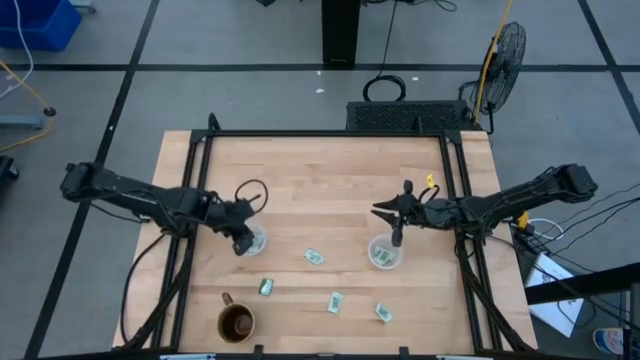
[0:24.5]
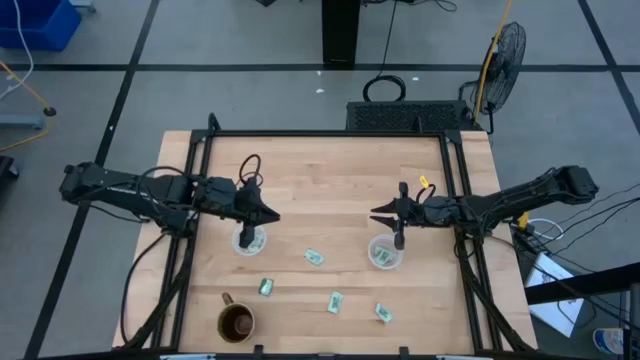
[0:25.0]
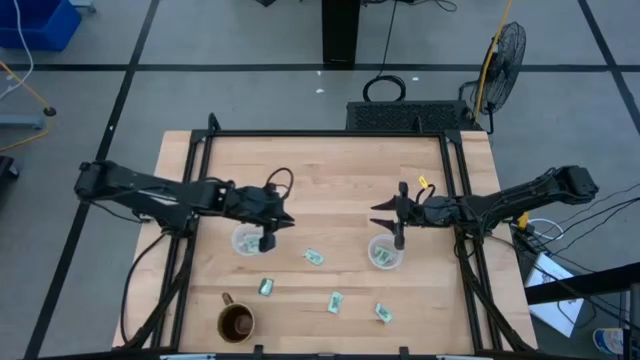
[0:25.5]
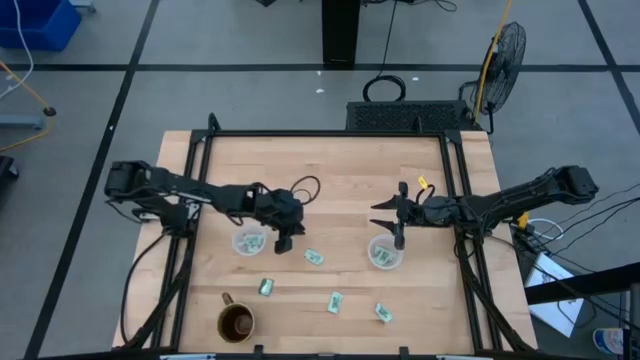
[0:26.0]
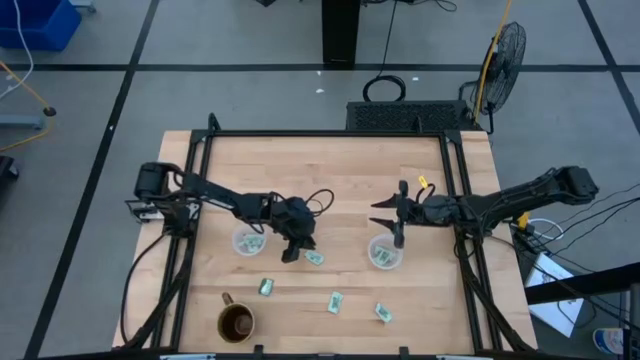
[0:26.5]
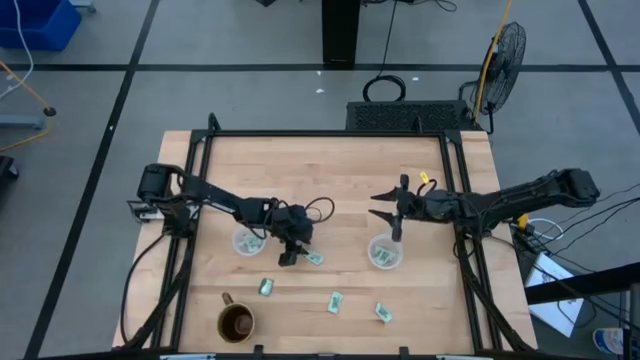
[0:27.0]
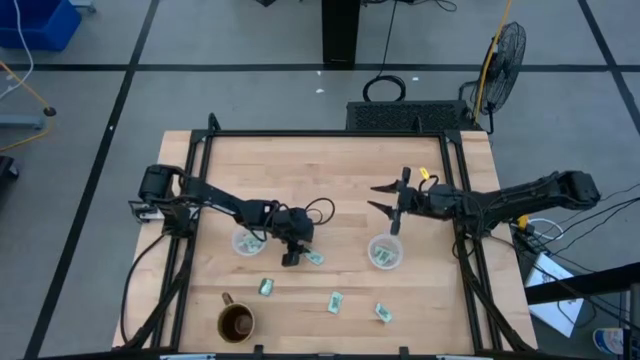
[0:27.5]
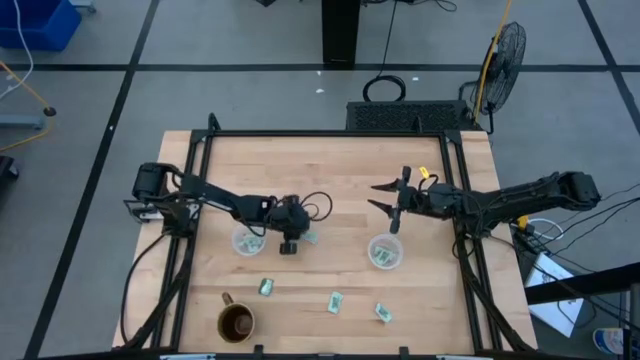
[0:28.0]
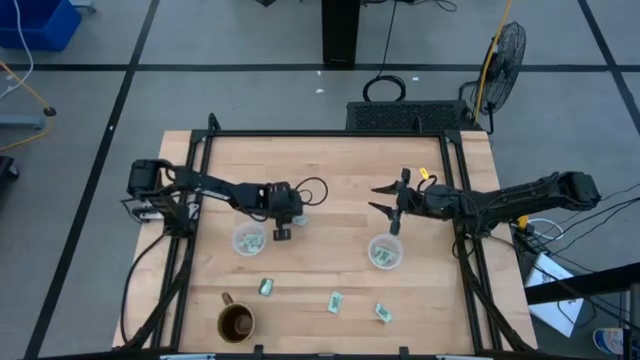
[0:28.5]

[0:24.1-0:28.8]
Task: Pick and place Stevia / Truvia into bins
Put the light green stevia packet into the left transparent container

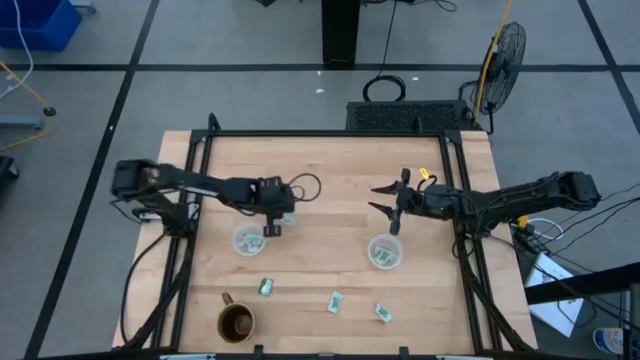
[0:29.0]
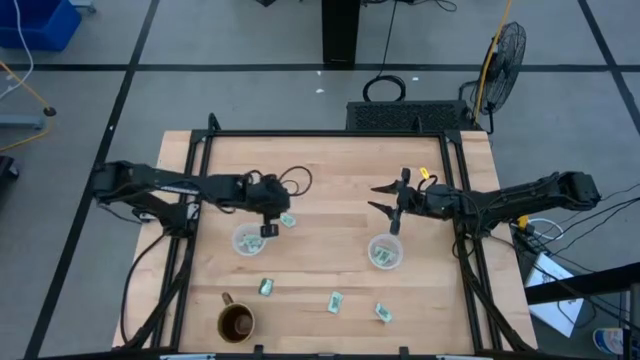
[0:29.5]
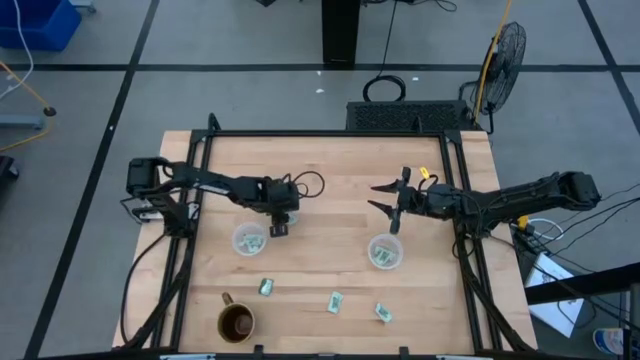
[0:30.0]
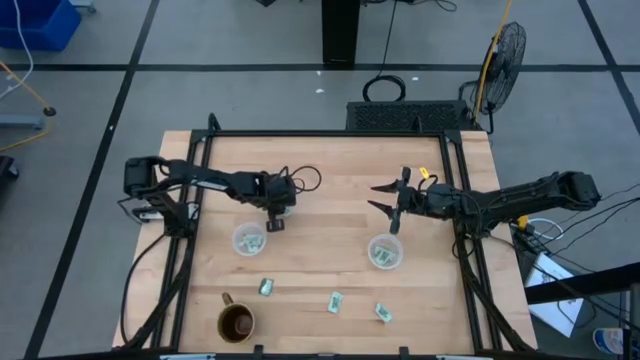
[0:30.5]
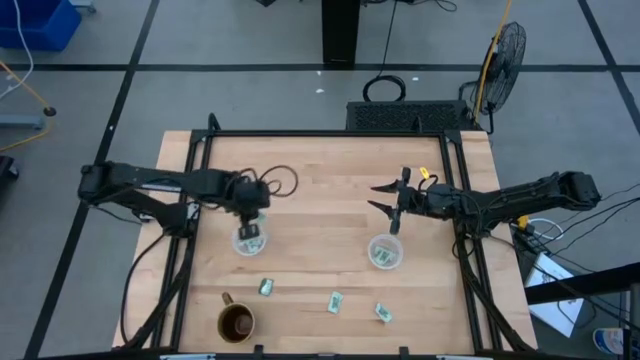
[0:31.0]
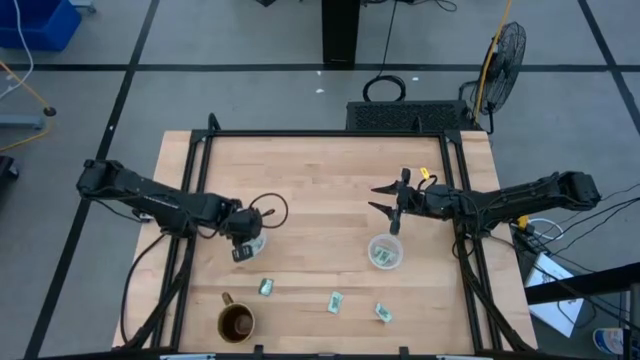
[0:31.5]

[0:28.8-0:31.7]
Put the light green stevia packet into the left transparent container

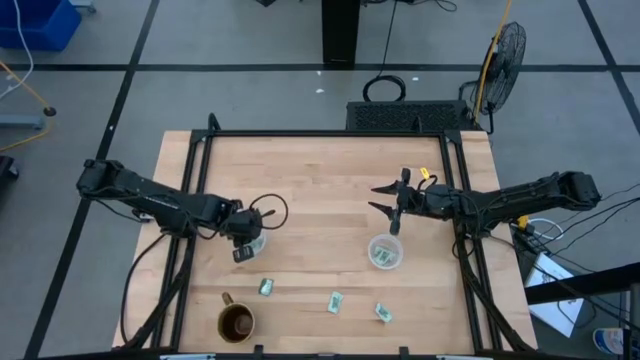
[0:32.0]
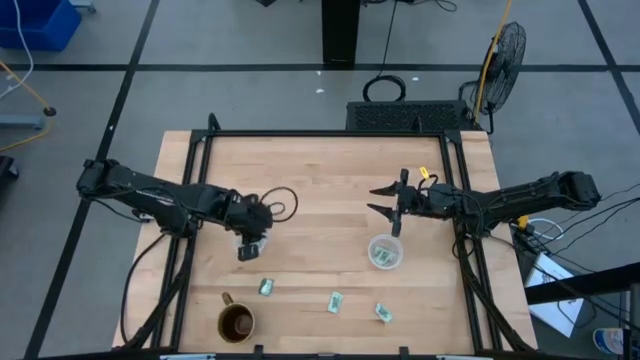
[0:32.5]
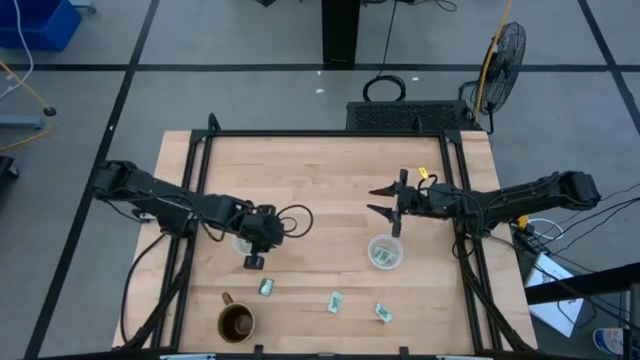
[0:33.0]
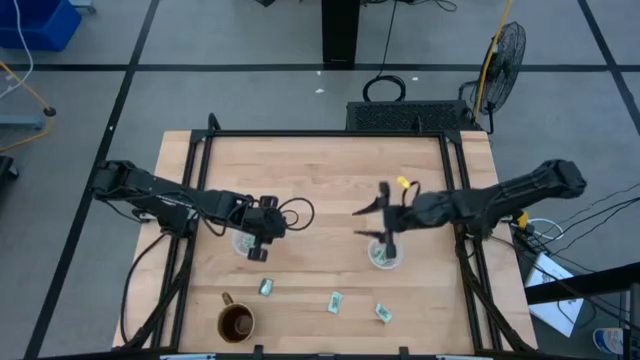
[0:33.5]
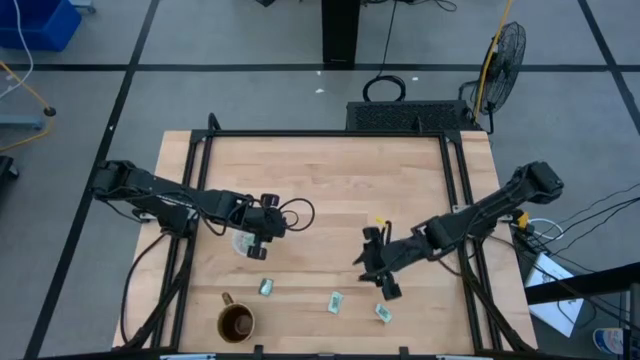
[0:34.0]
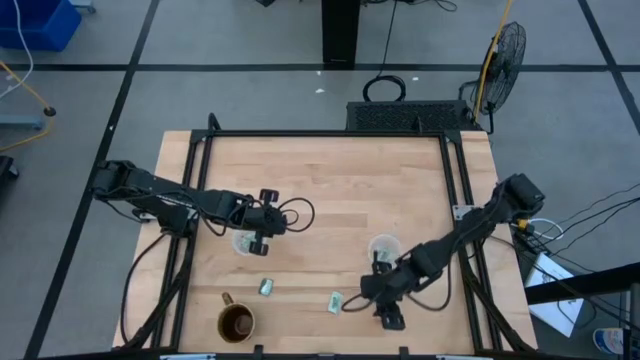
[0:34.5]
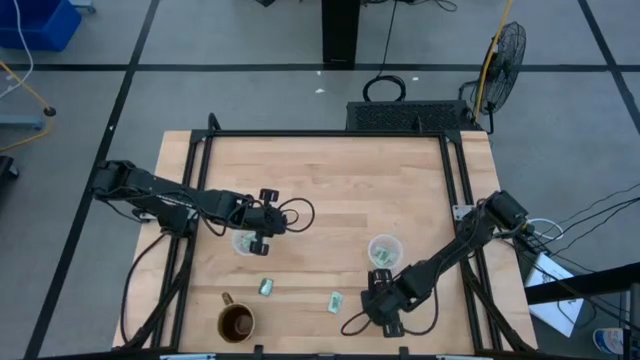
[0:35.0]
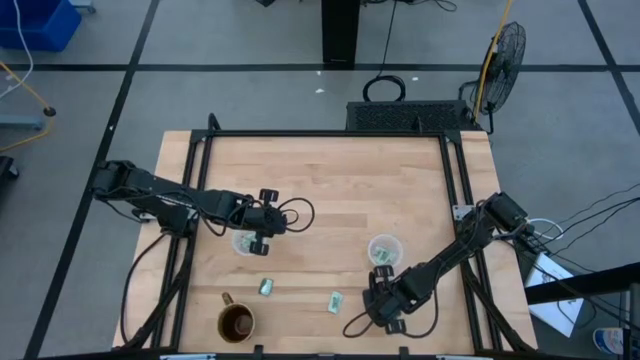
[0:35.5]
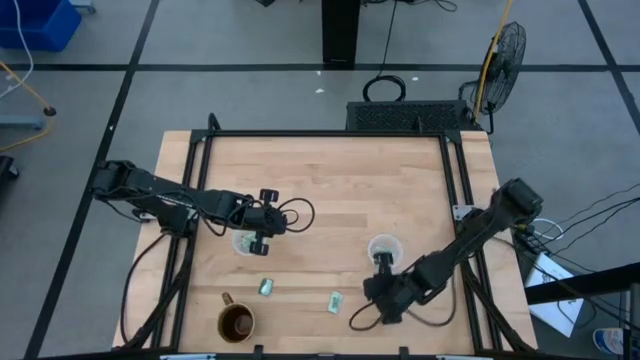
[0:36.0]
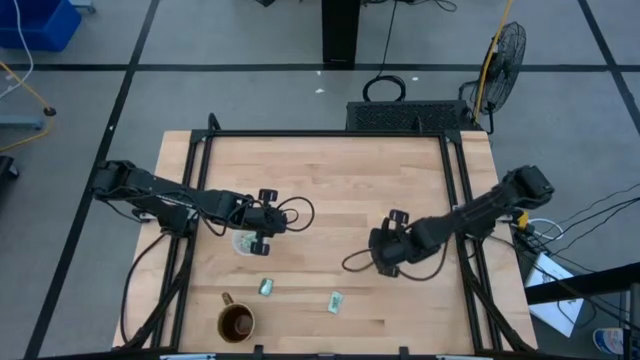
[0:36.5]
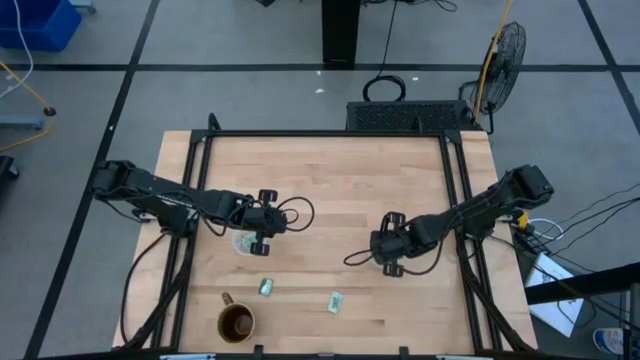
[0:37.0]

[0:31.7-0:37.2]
Put the light green stevia packet into the right transparent container

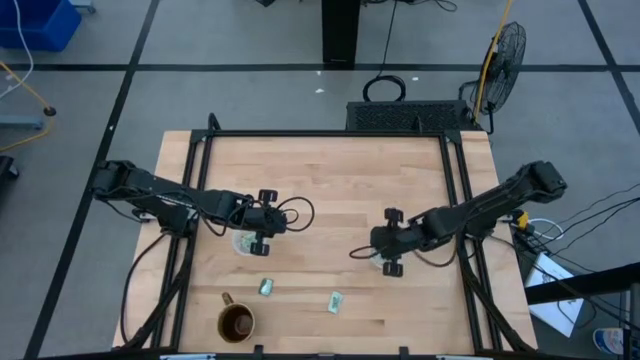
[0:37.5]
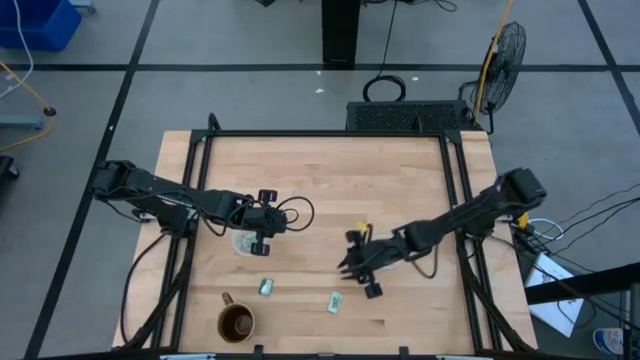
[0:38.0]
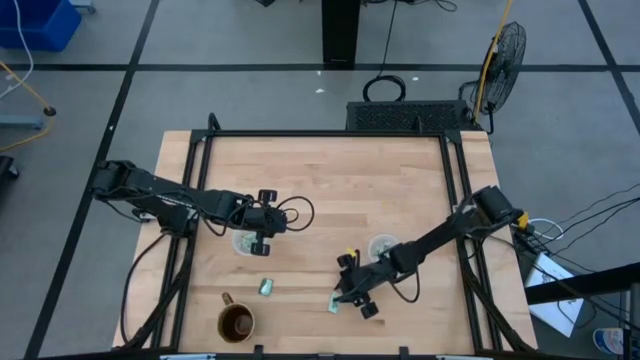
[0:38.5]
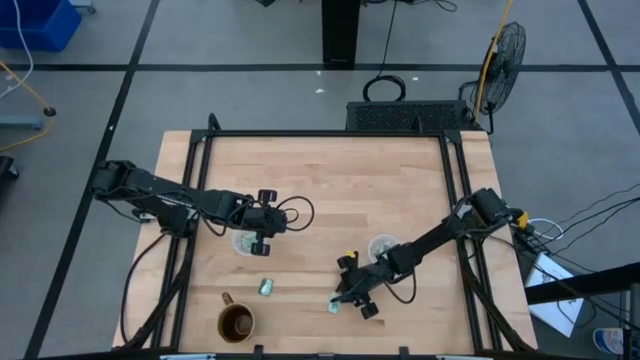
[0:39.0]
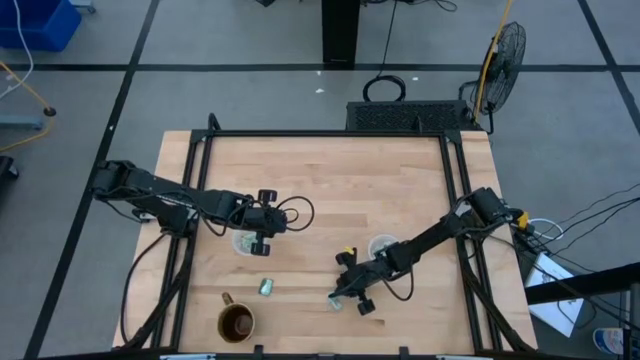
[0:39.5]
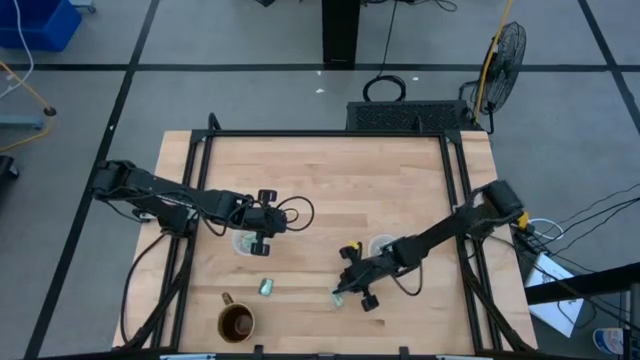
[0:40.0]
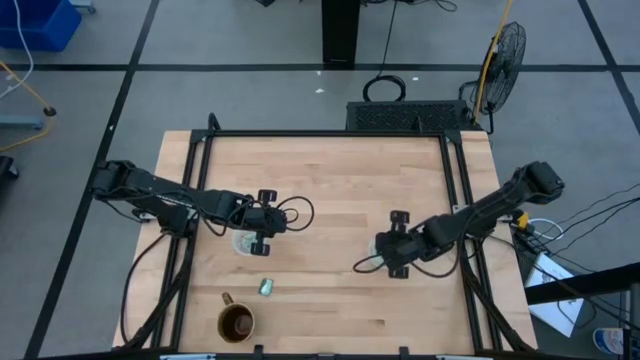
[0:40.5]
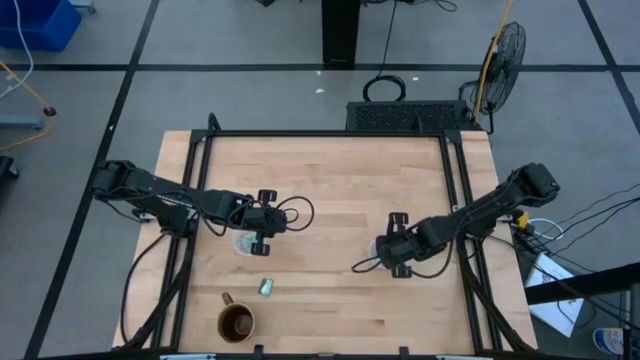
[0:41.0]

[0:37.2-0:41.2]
Put the light green stevia packet into the right transparent container

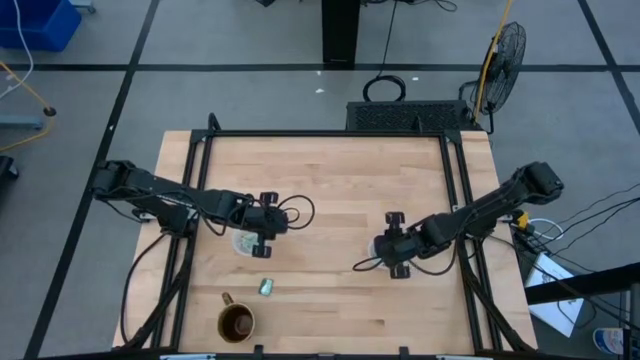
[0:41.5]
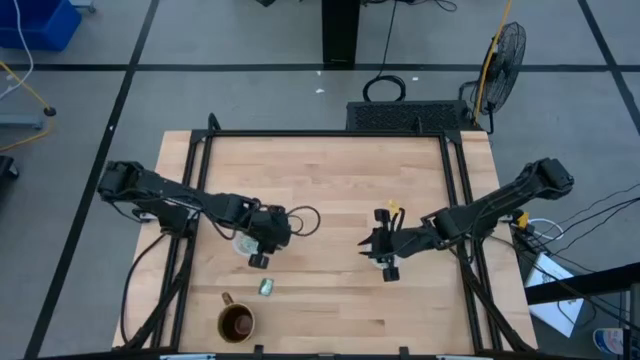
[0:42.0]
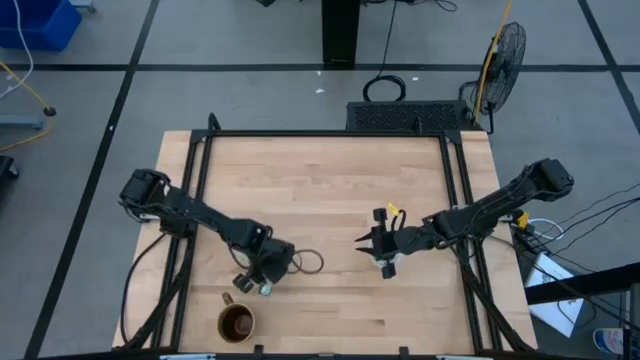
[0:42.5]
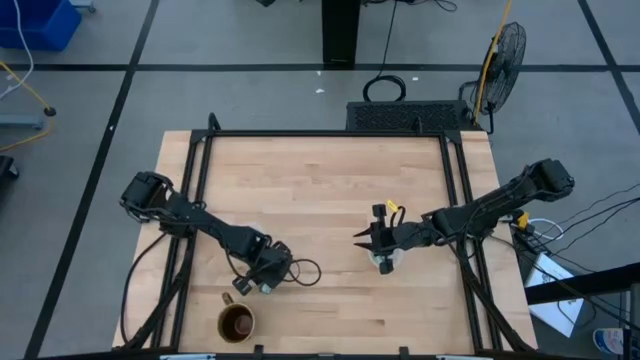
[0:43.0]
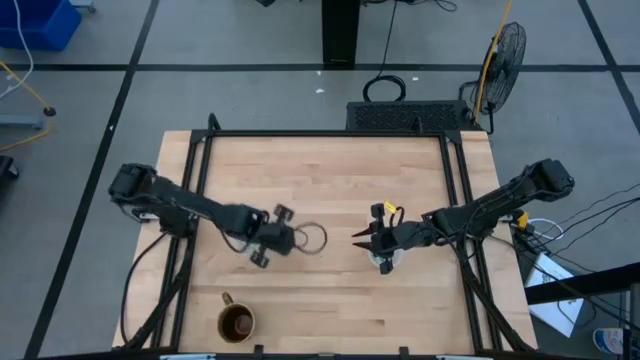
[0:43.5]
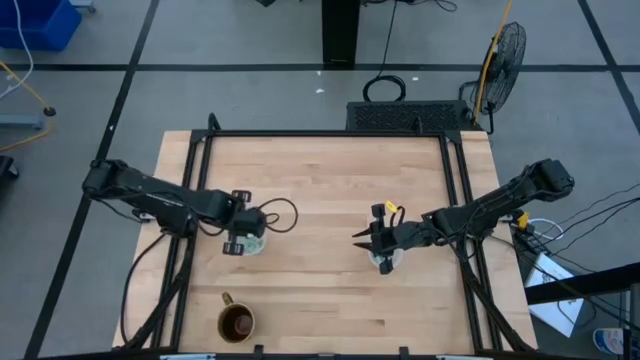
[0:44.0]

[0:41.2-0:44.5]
Put the green stevia packet into the left transparent container

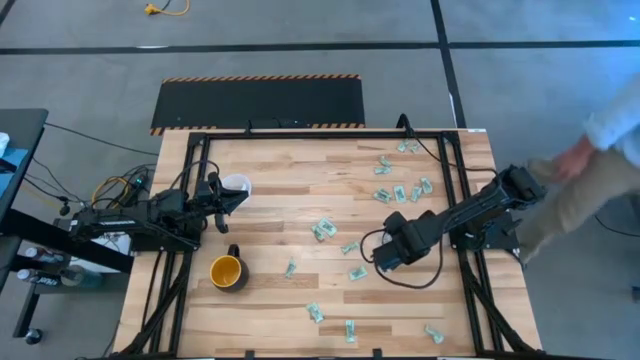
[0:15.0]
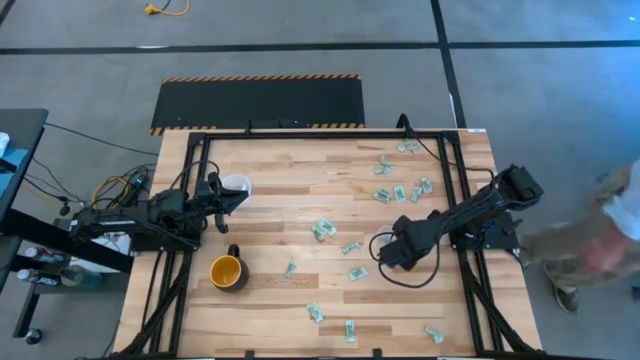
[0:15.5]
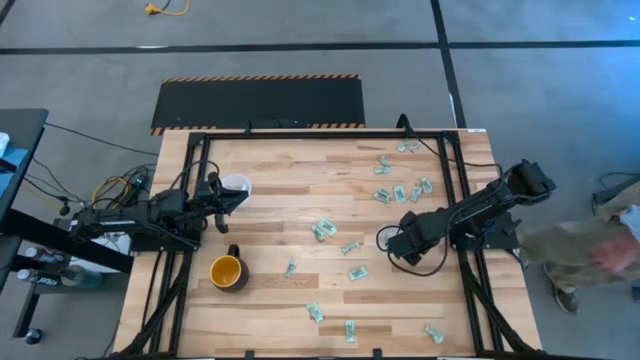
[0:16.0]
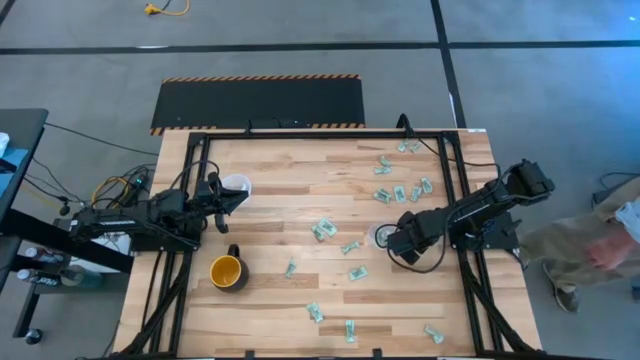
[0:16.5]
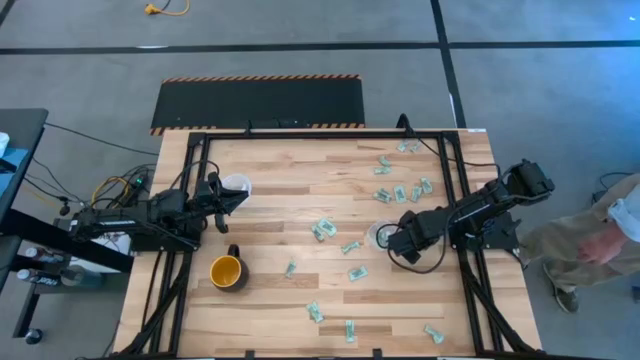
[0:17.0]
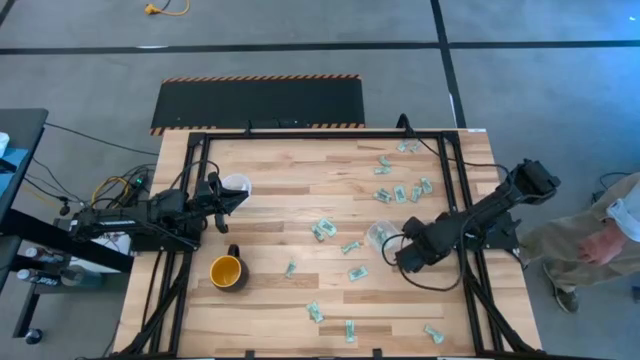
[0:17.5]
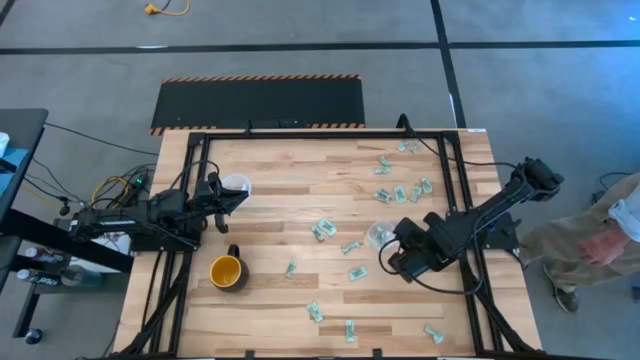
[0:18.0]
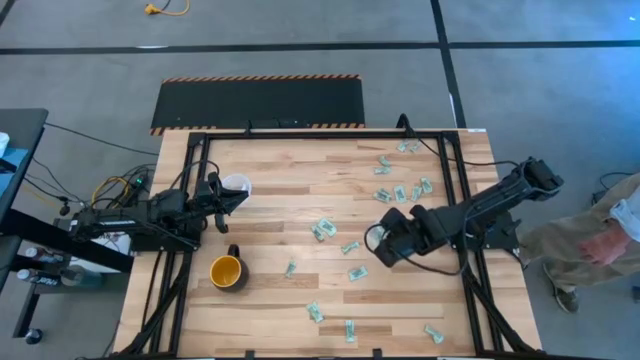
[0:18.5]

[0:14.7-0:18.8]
Task: Pick and place Stevia / Truvia into bins
Put the white stevia packet into the square transparent container
